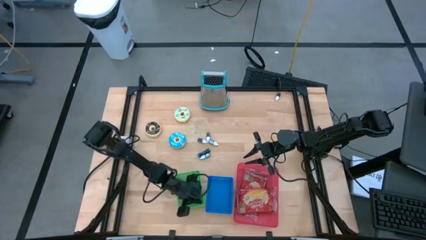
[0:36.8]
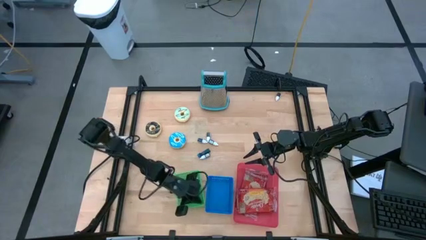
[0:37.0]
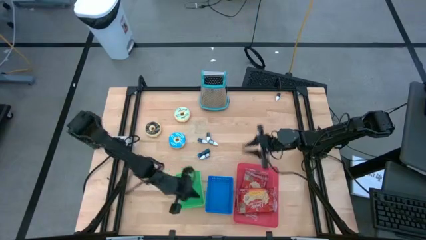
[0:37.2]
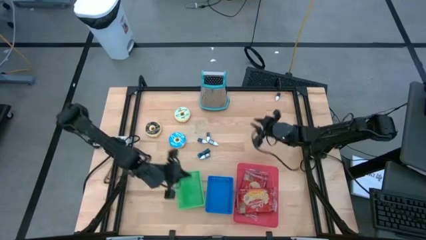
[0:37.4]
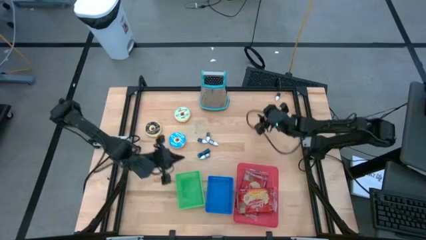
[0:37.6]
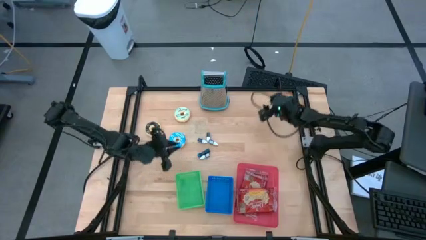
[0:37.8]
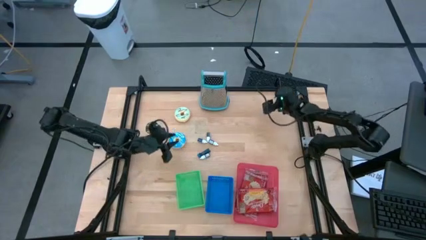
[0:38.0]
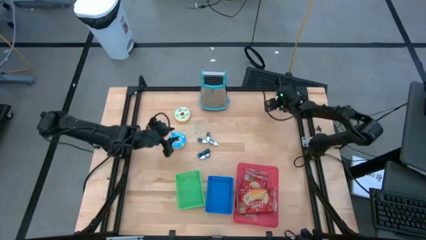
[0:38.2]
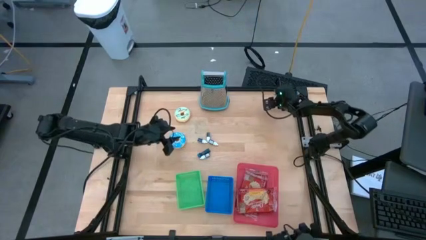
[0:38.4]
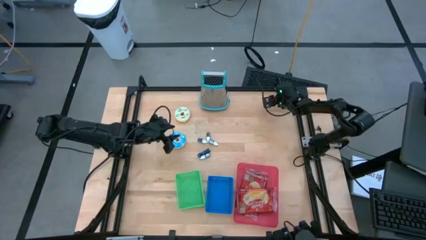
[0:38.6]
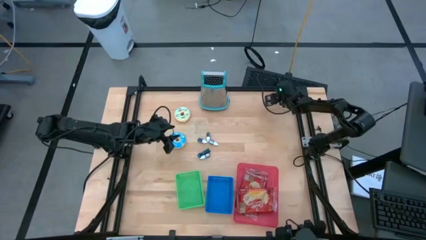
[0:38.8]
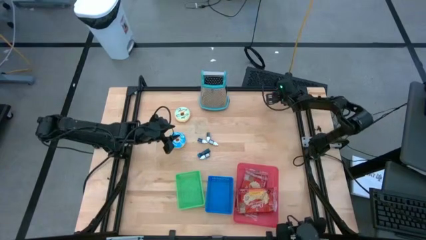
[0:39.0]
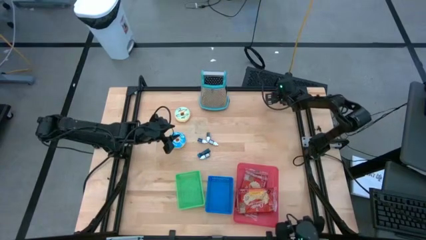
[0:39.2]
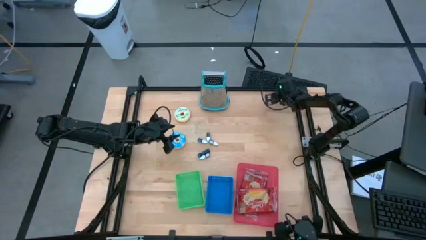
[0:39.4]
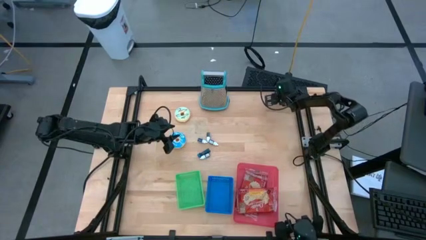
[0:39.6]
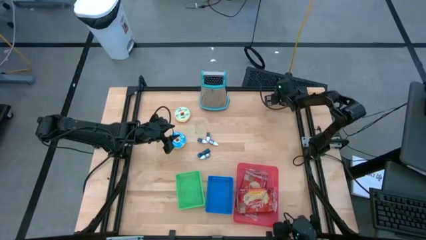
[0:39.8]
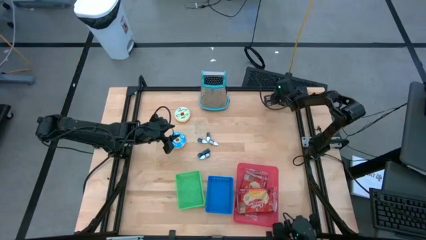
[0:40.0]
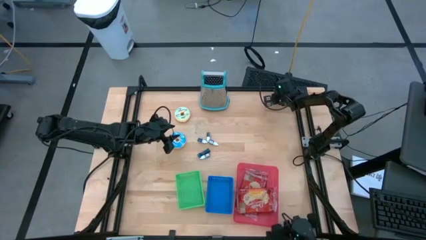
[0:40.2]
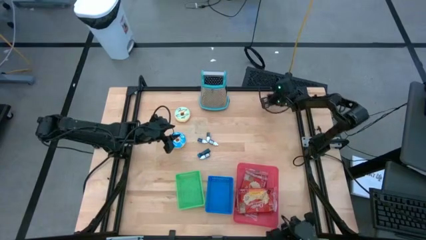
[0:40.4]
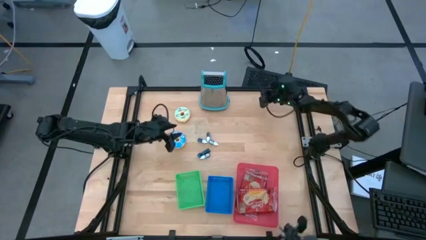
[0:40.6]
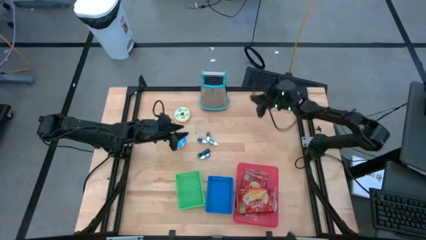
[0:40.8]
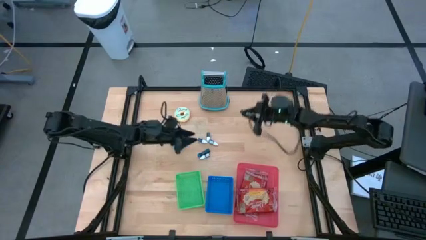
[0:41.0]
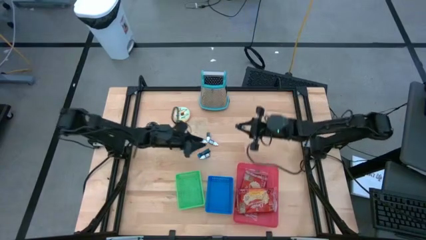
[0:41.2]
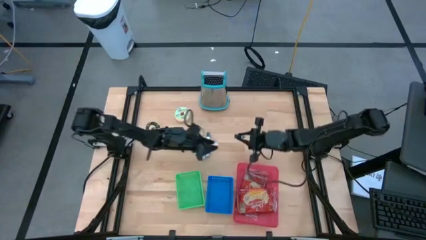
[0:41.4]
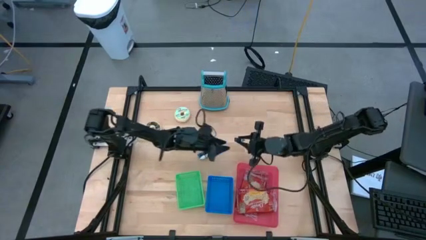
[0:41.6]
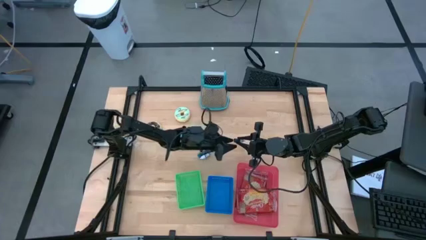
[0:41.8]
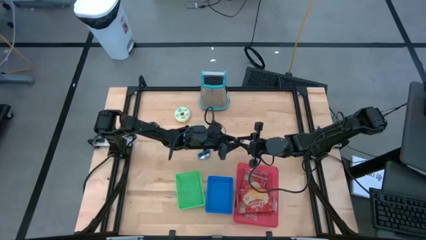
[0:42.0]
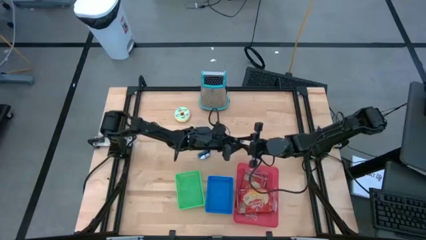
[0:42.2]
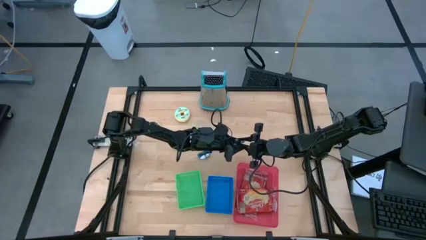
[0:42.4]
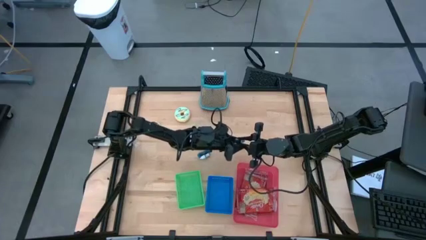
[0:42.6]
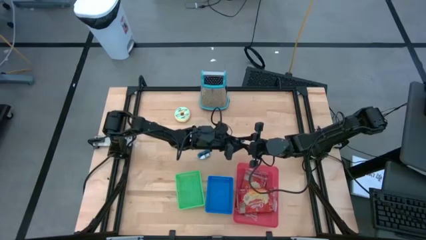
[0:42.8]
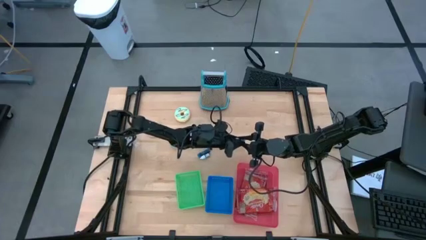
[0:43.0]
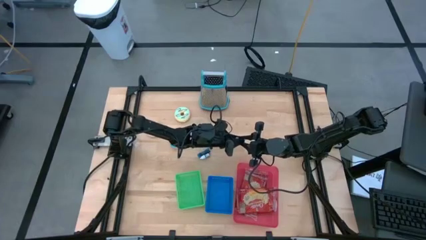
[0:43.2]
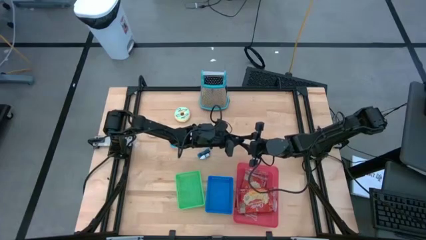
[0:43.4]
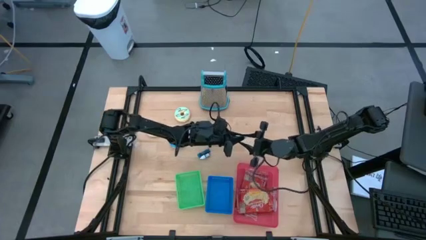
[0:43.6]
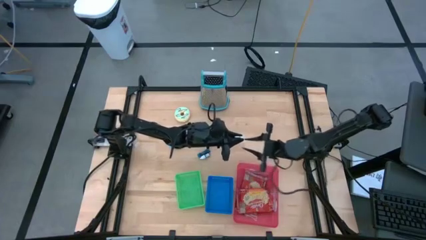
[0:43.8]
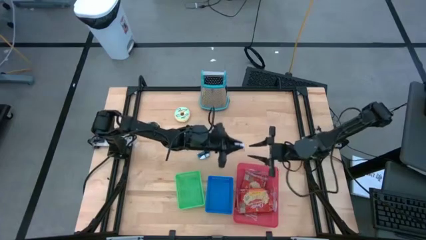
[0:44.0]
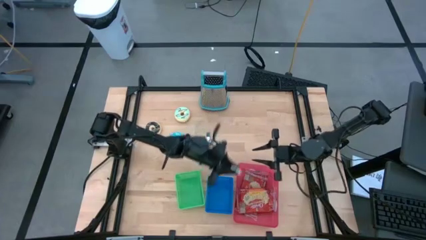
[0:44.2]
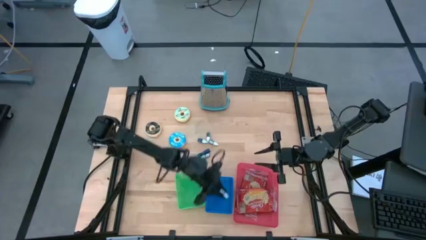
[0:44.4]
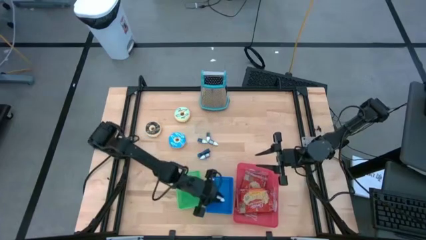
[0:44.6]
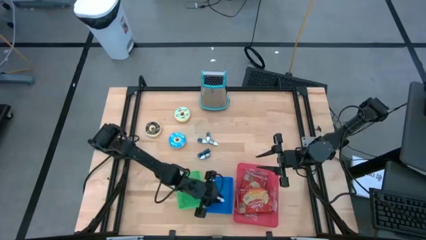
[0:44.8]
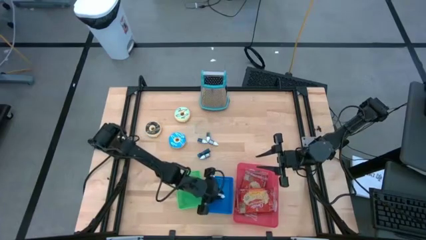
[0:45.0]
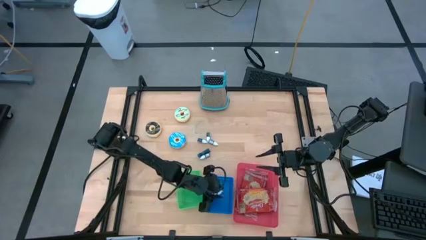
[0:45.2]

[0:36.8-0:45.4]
Put the top green food coloring bottle into the blue bin

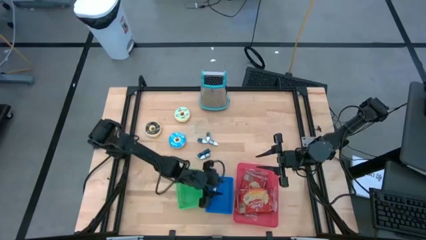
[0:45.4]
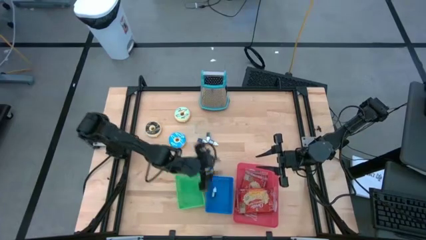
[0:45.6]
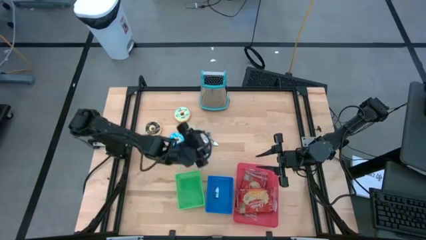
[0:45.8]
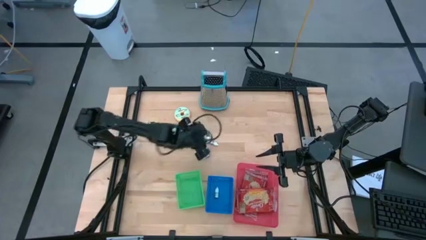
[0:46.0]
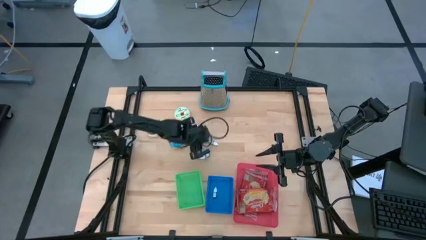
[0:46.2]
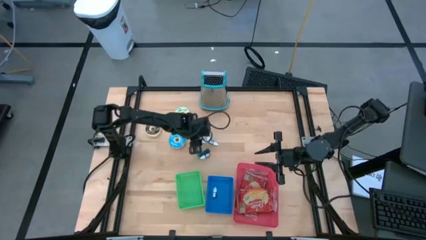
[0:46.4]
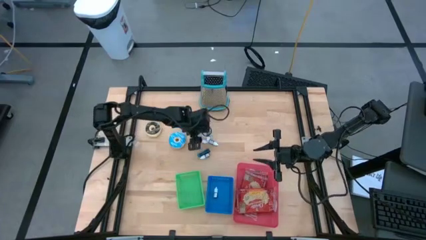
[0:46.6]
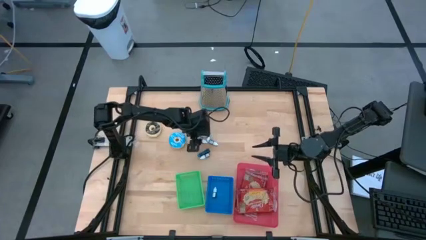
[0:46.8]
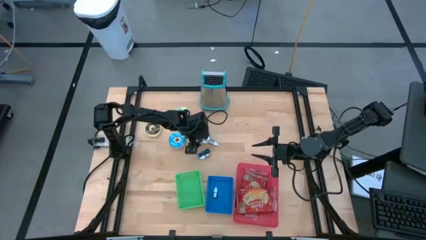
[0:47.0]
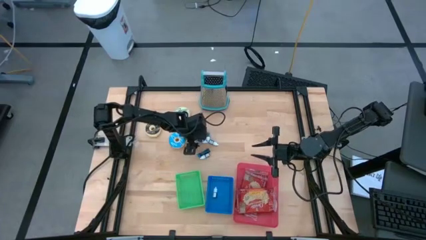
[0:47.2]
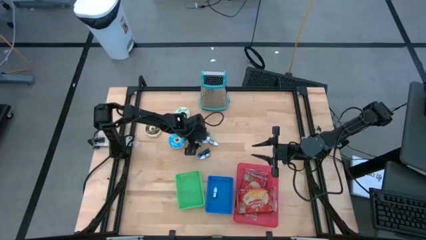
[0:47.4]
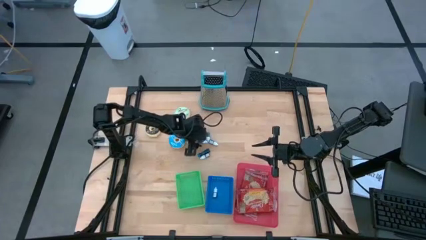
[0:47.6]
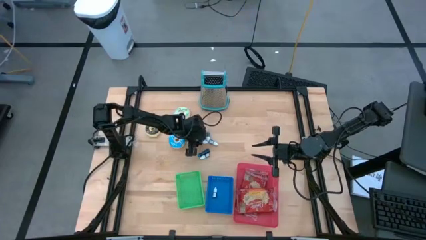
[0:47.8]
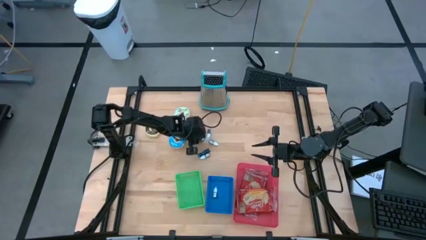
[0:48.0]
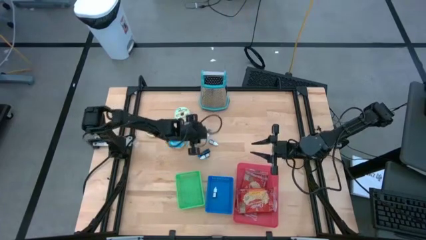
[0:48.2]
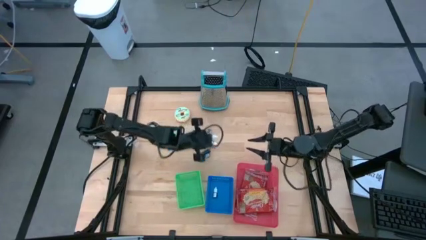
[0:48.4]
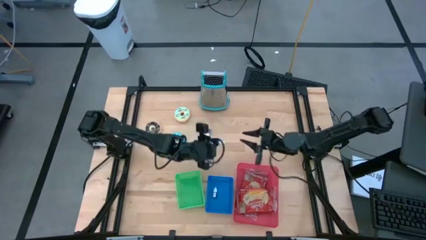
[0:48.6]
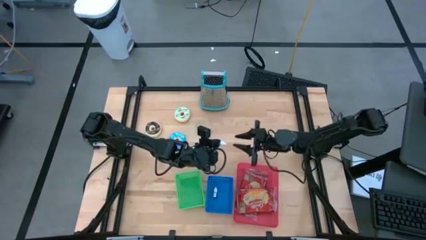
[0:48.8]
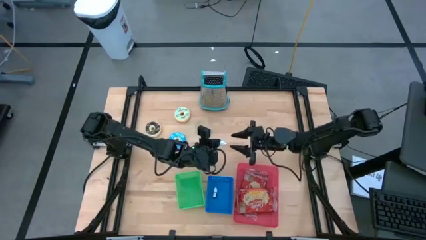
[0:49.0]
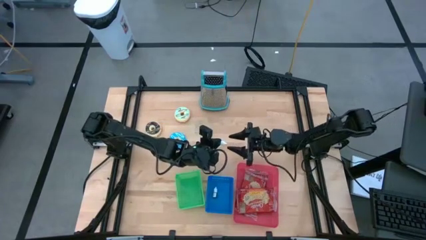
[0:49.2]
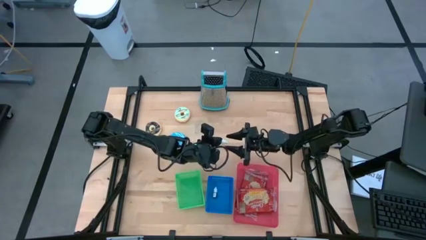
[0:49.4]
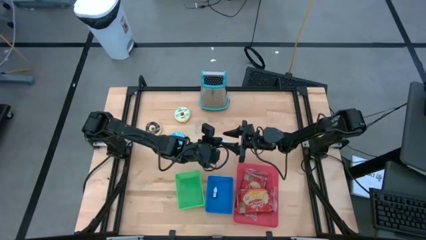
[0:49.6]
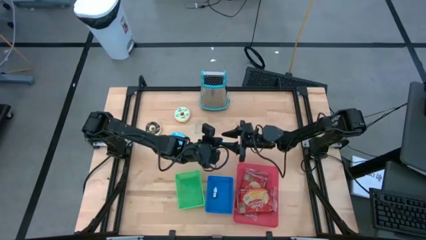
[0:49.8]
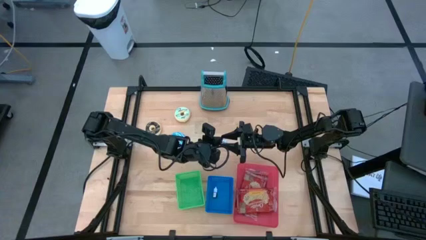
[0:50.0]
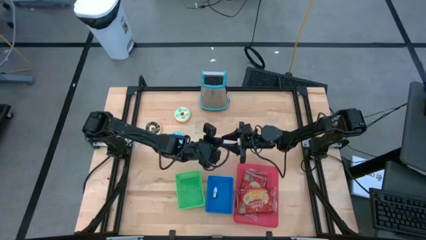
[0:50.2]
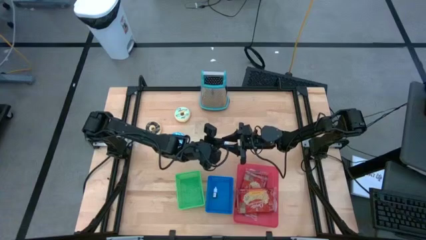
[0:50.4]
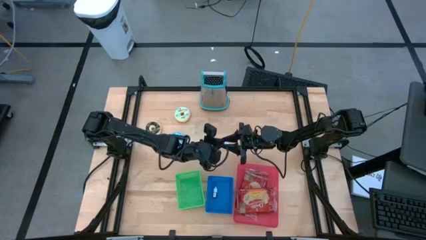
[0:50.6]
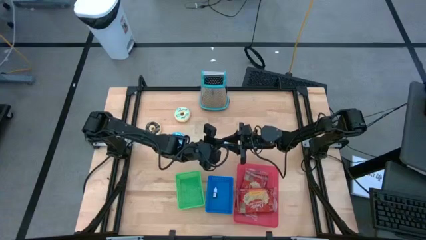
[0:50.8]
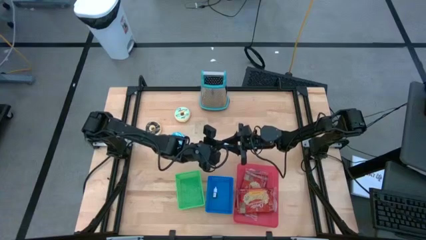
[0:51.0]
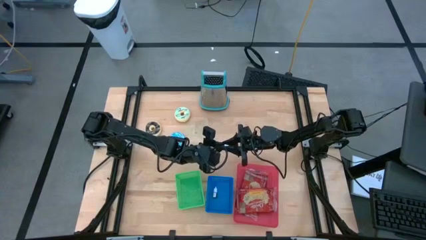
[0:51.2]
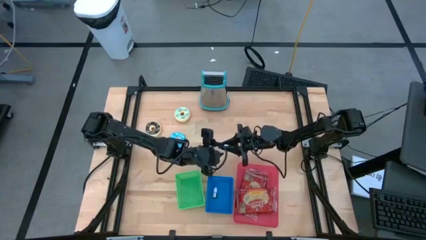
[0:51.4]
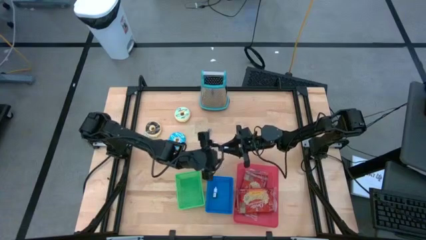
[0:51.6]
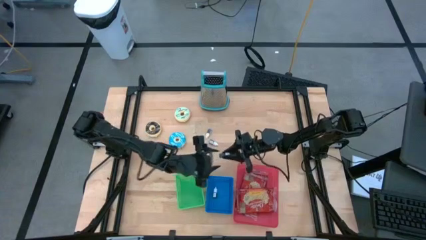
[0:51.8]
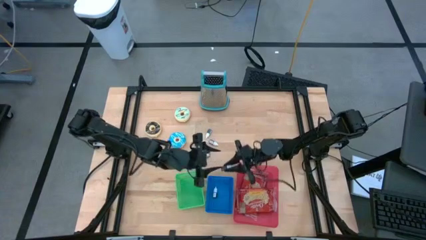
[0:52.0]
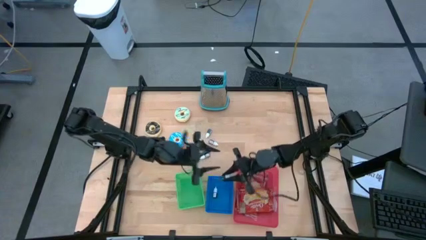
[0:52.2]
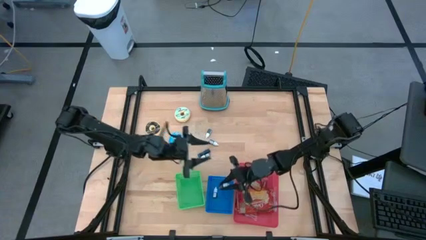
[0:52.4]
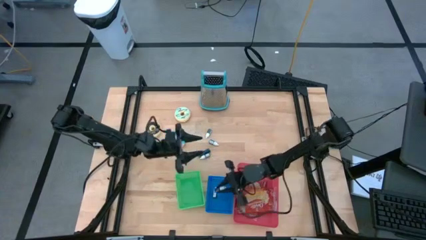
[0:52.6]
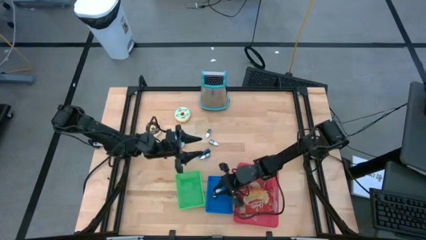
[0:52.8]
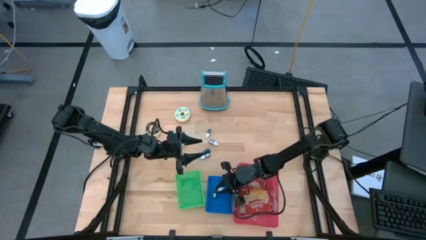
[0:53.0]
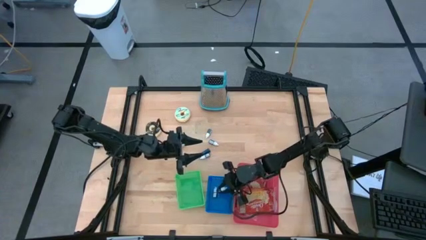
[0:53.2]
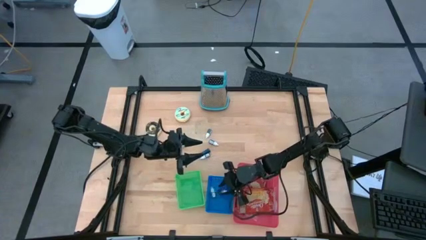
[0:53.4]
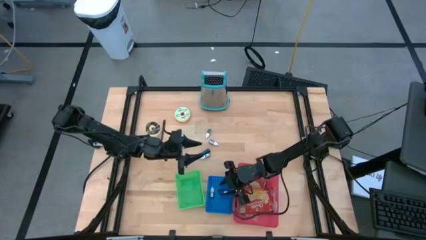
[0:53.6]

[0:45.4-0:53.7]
Put the left blue food coloring bottle into the blue bin
